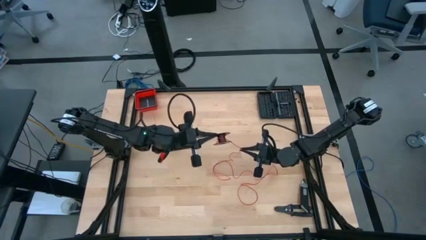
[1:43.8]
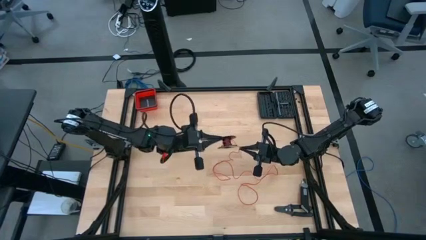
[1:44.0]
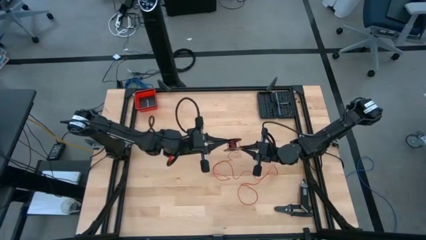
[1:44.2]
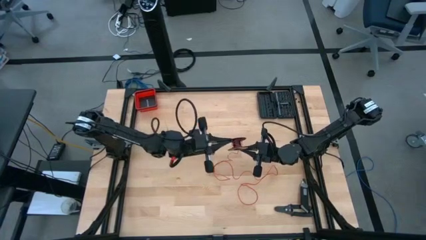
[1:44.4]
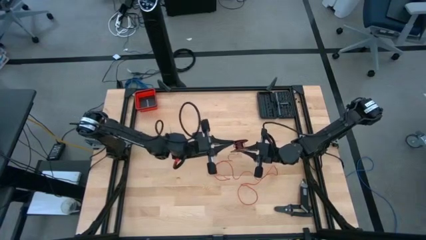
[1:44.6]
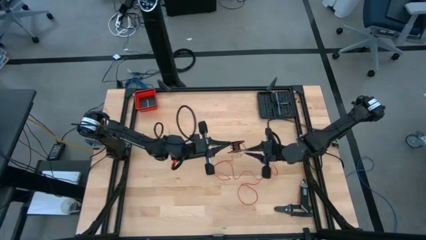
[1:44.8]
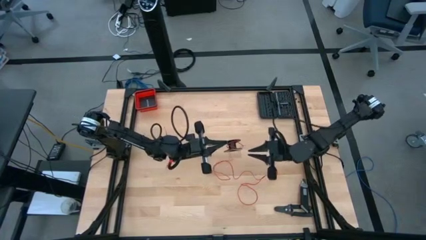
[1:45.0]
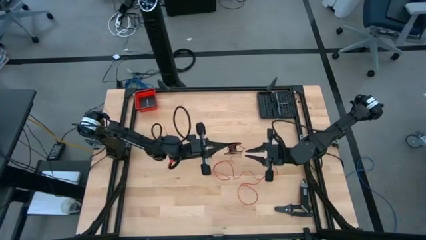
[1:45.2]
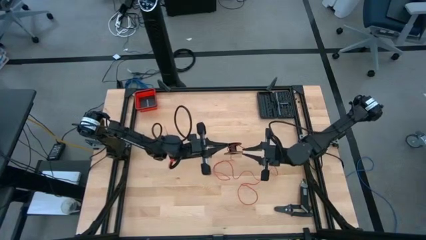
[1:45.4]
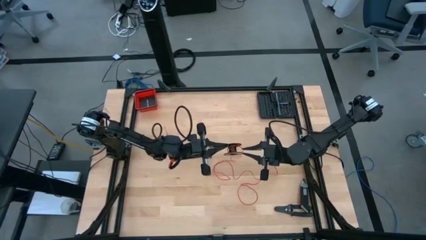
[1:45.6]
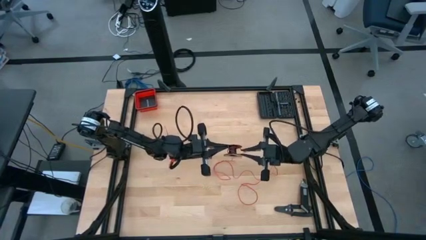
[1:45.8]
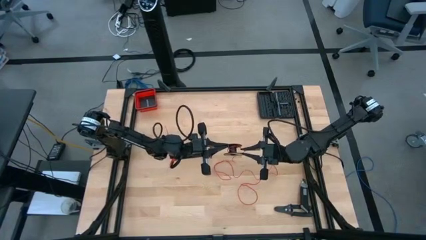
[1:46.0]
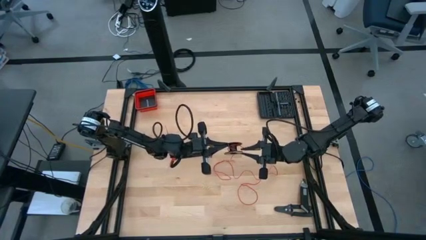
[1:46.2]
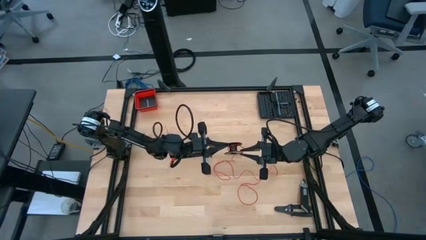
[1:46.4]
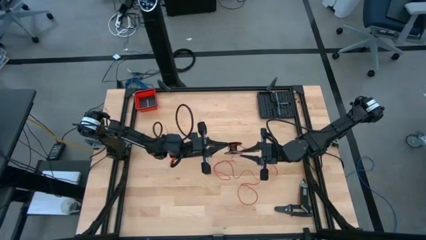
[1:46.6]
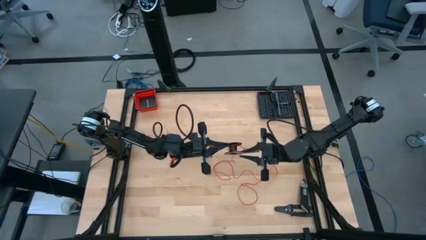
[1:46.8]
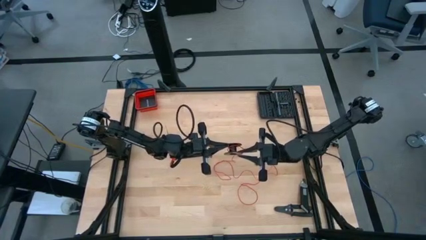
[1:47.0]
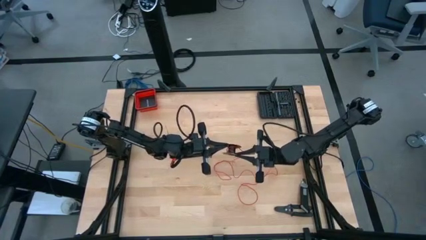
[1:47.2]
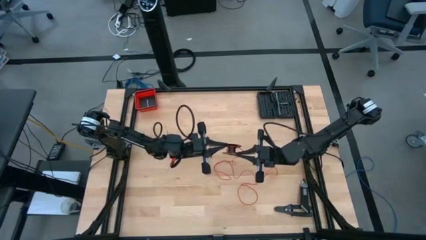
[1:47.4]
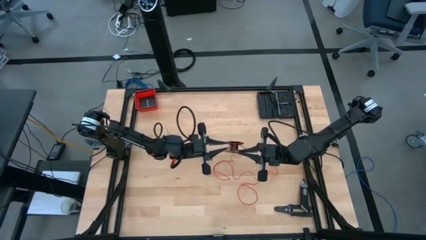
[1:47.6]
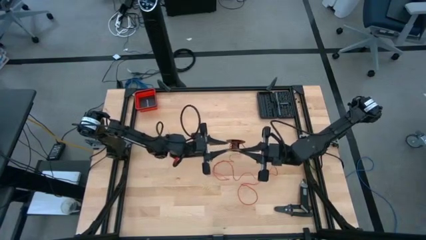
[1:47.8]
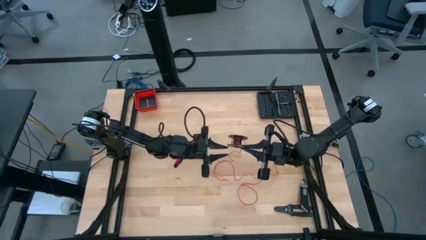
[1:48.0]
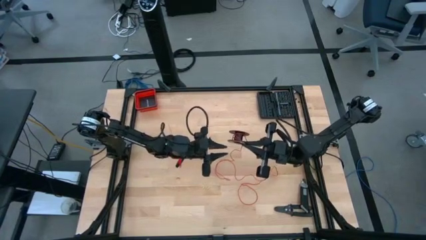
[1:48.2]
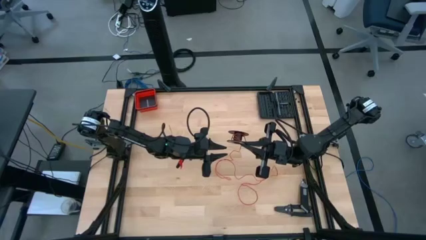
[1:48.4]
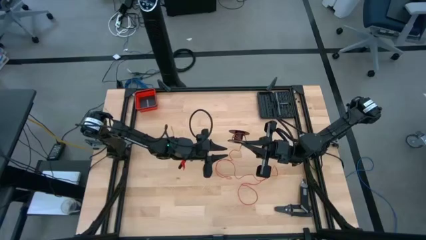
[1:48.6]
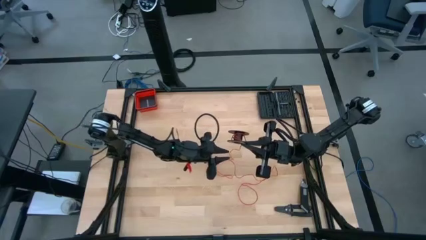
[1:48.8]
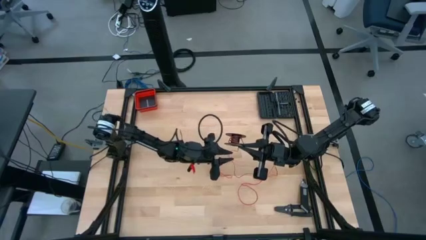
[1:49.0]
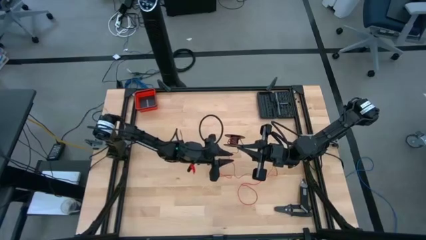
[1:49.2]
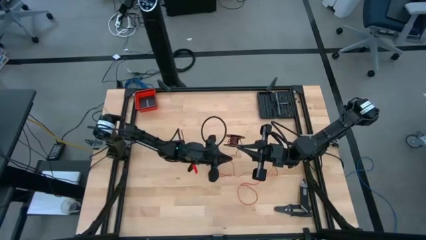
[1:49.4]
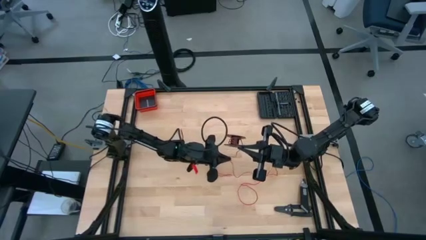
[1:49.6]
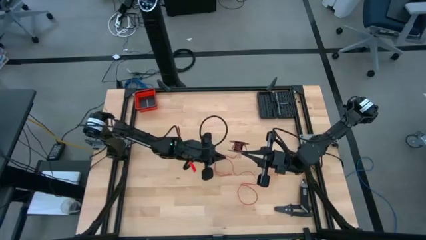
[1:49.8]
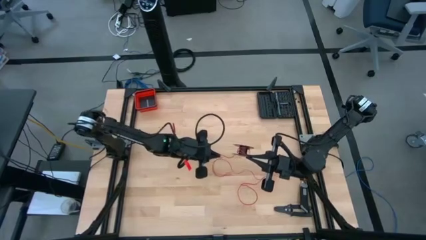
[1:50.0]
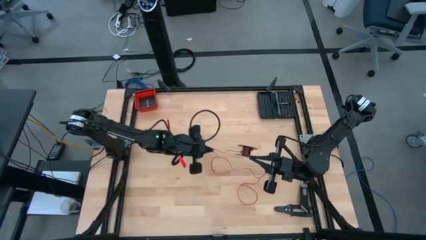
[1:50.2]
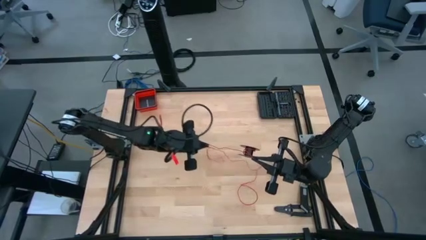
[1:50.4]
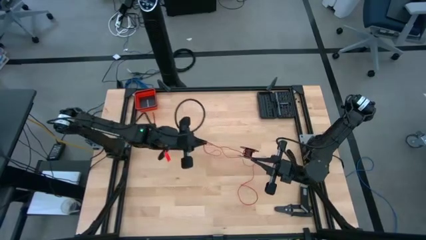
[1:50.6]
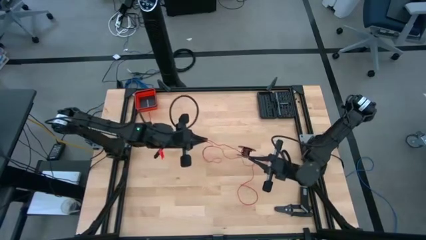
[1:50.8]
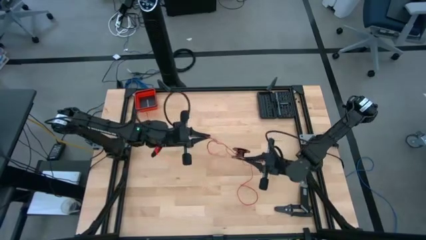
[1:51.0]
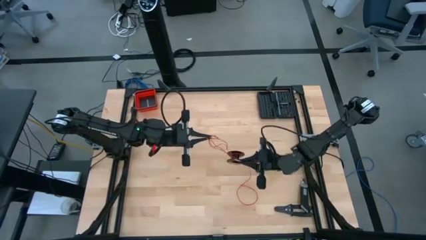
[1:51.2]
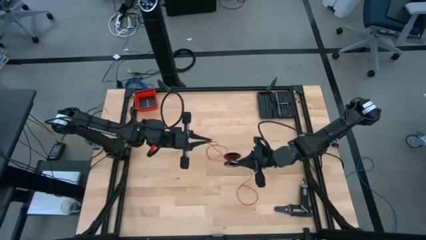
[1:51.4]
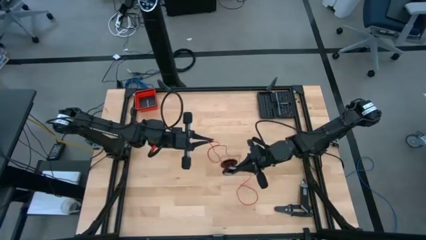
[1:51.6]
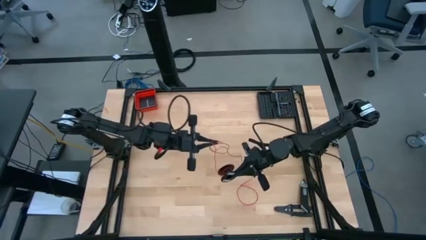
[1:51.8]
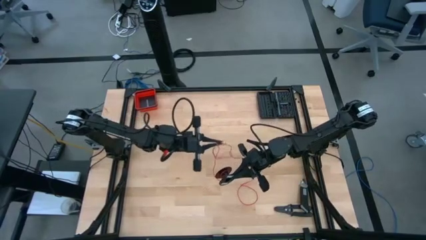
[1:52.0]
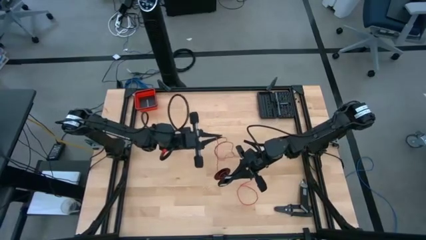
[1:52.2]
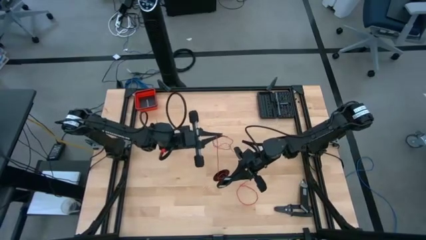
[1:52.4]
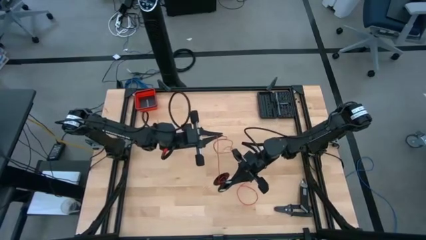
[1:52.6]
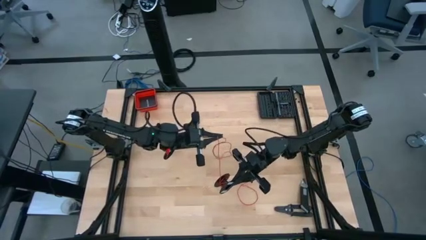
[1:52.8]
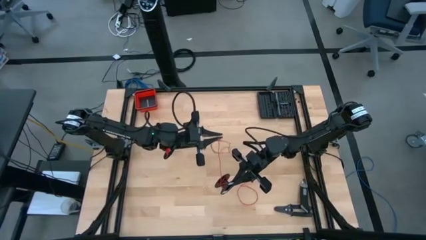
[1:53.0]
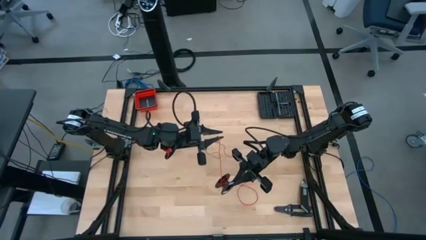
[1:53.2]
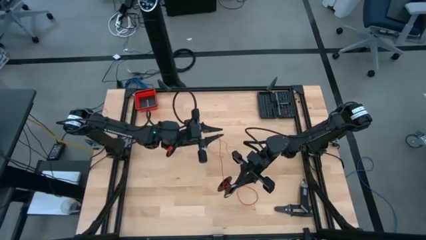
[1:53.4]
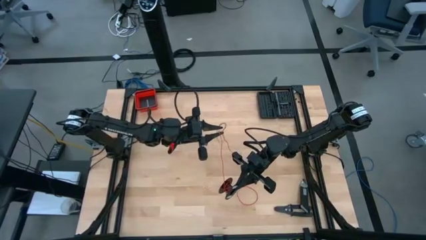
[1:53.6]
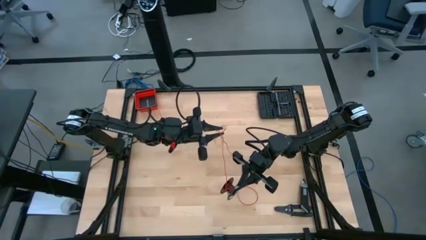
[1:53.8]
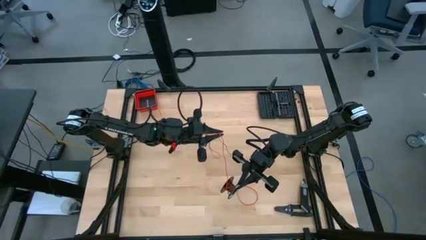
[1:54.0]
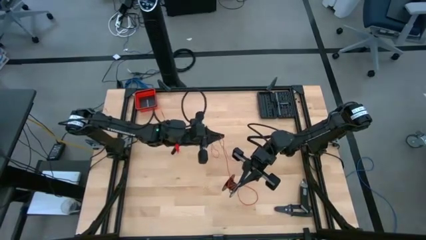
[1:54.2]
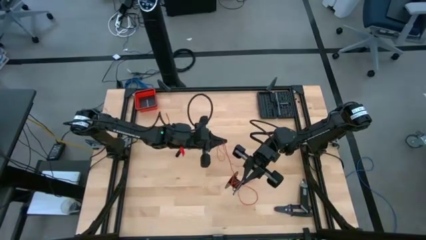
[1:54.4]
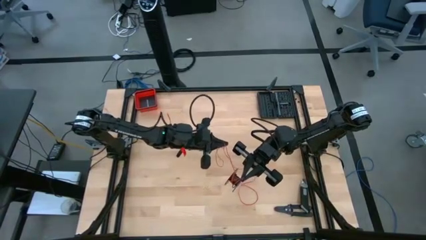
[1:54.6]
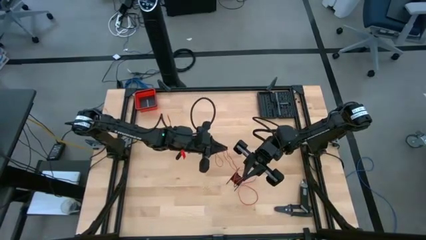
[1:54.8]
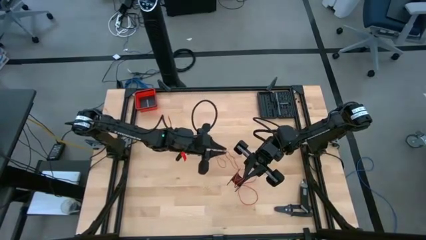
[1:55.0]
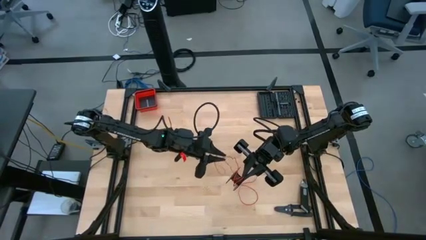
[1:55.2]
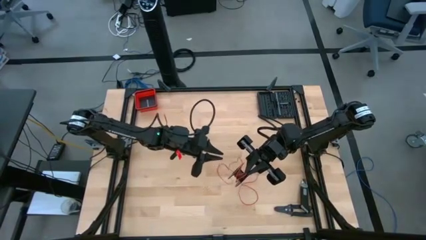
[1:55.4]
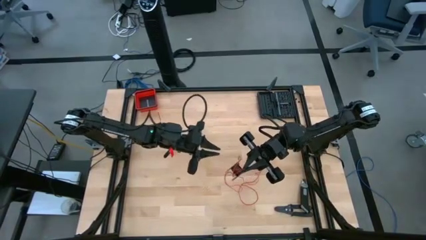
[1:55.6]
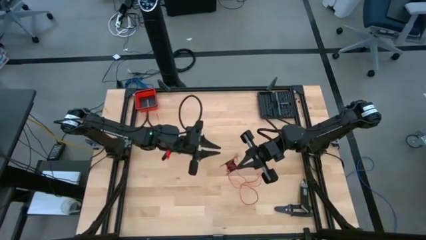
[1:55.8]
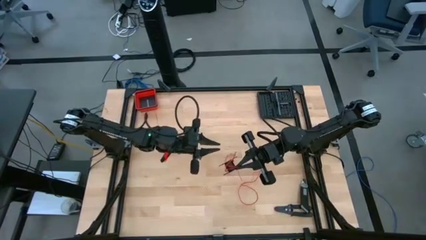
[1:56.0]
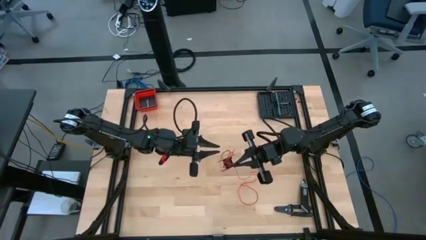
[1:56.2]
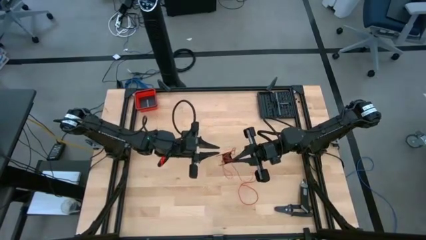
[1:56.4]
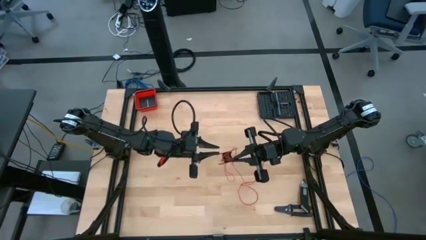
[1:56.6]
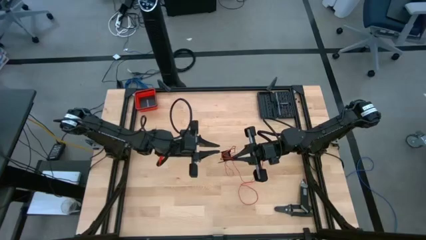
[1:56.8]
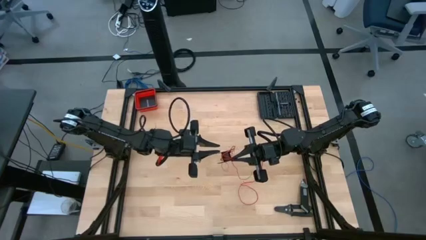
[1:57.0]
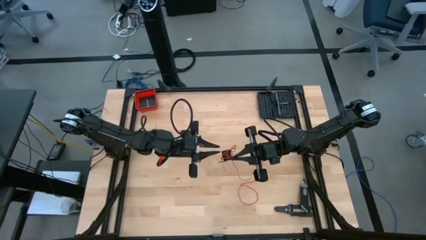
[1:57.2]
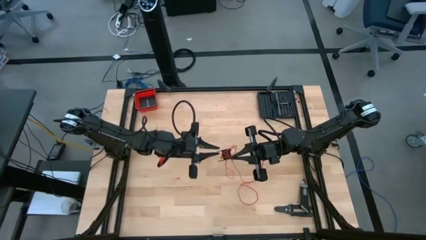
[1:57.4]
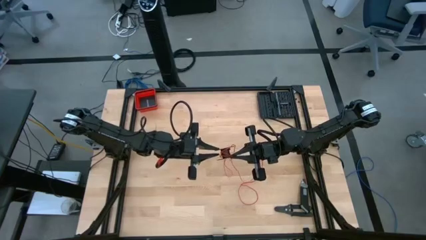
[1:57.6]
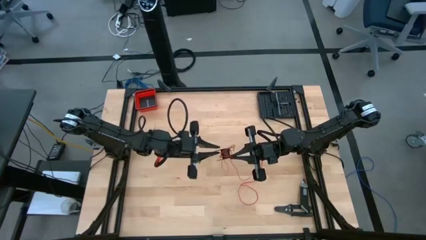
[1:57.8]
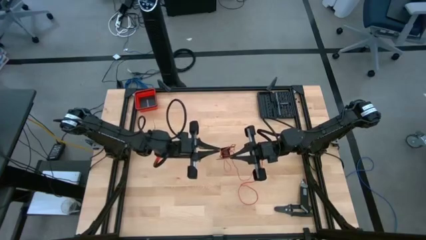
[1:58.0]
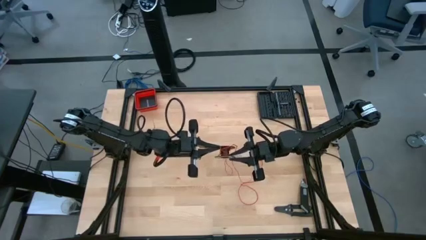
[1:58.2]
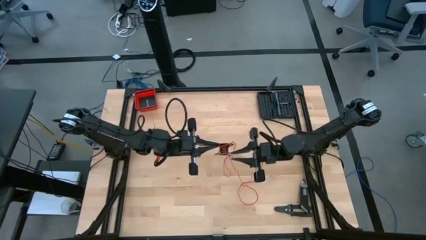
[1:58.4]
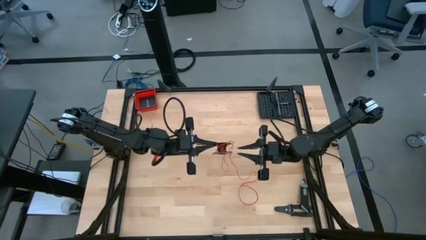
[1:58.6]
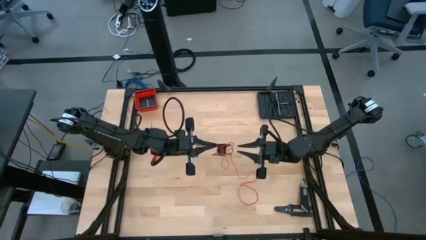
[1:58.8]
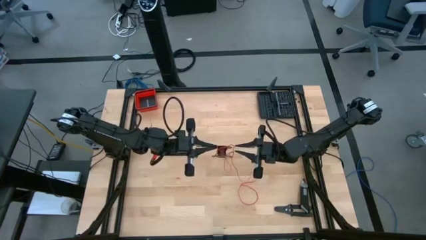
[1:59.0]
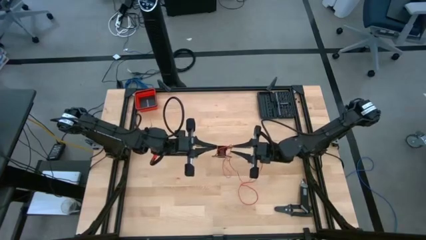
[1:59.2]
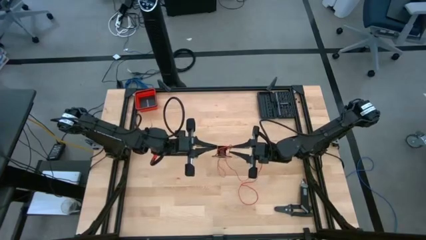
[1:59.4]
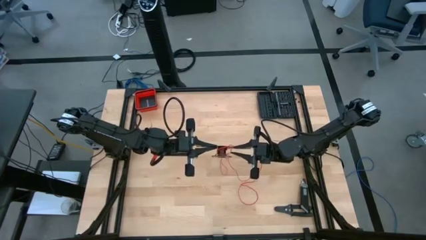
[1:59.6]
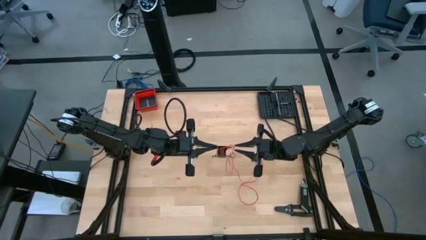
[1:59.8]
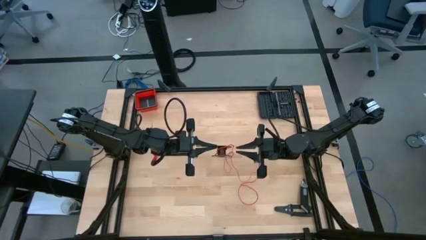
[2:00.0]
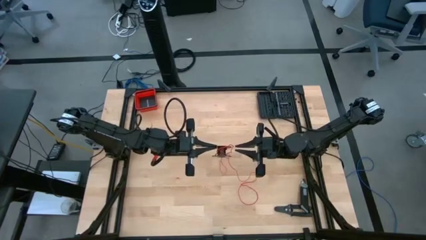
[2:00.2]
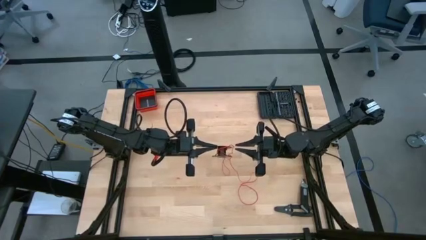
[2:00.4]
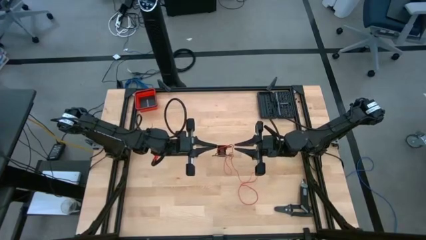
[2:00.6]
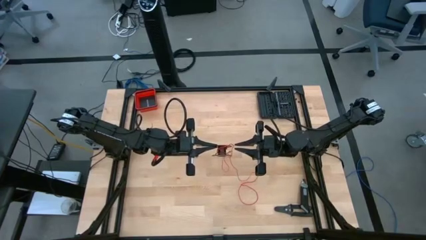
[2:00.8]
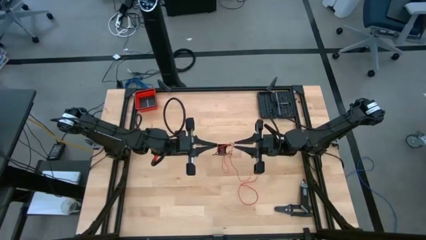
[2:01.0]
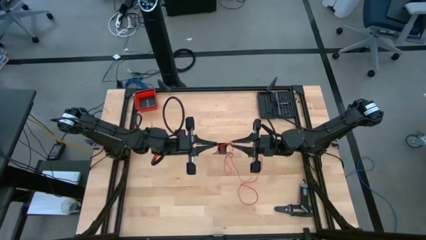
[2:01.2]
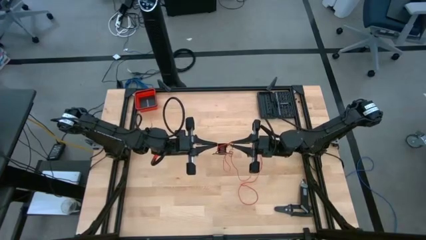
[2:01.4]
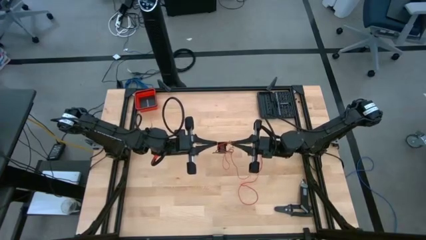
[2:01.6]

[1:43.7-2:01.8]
Task: Coil cords
Coil the red wire onto the spool
